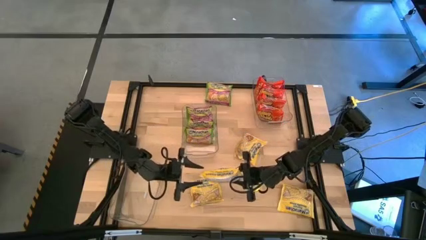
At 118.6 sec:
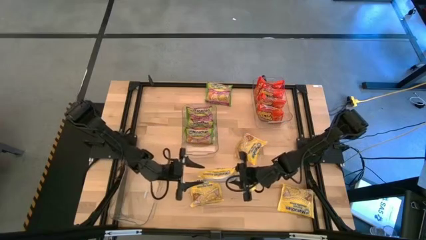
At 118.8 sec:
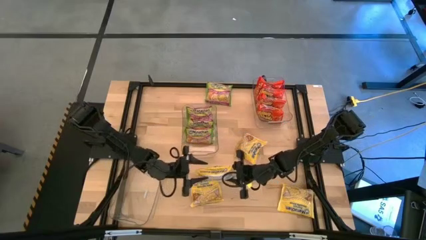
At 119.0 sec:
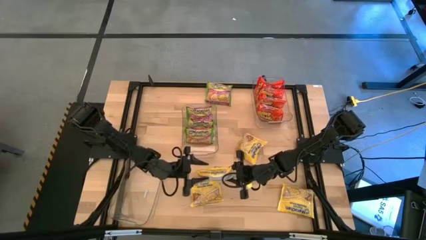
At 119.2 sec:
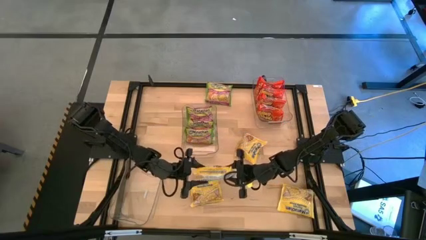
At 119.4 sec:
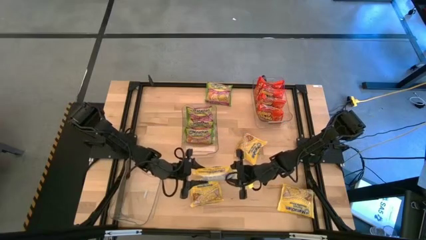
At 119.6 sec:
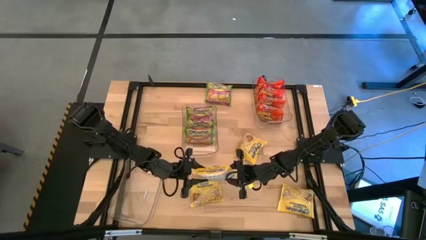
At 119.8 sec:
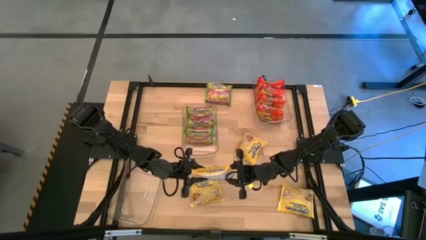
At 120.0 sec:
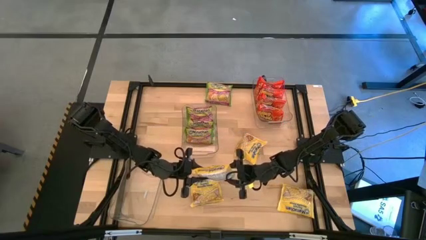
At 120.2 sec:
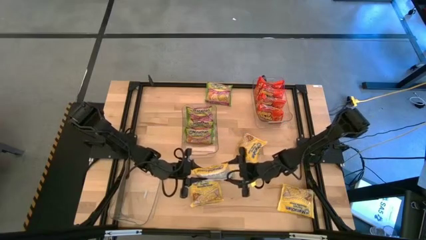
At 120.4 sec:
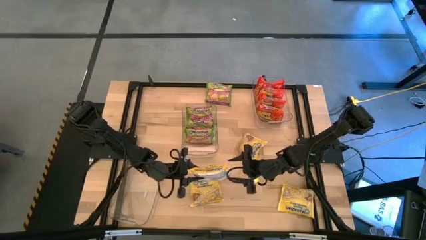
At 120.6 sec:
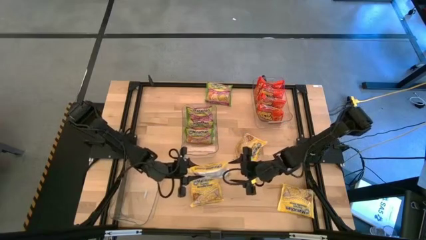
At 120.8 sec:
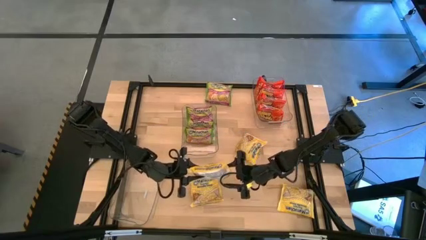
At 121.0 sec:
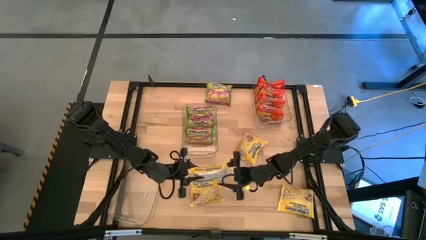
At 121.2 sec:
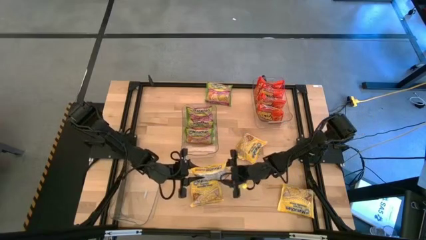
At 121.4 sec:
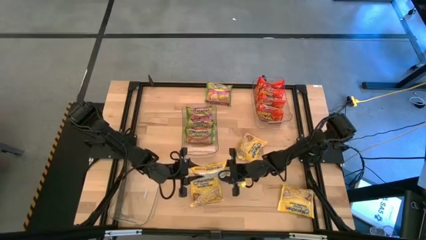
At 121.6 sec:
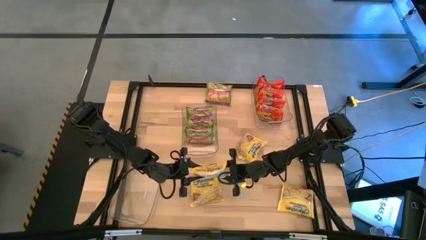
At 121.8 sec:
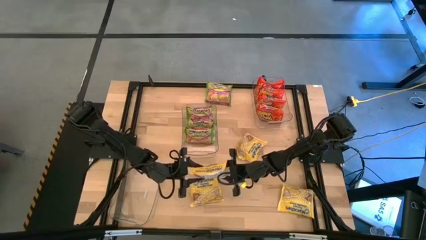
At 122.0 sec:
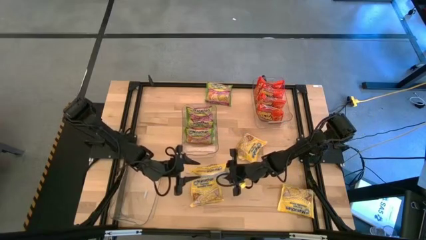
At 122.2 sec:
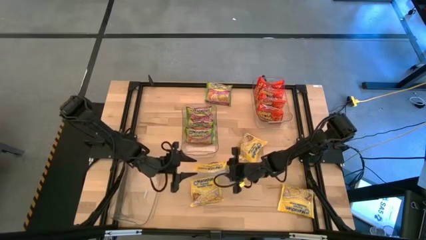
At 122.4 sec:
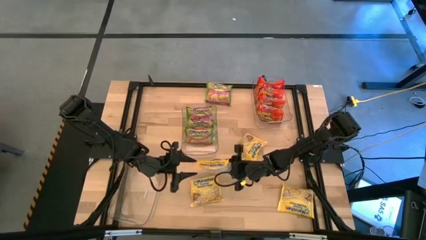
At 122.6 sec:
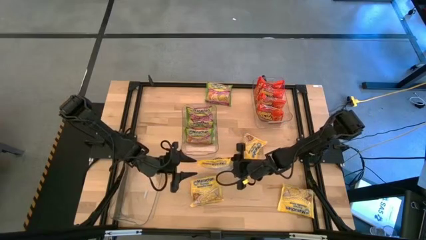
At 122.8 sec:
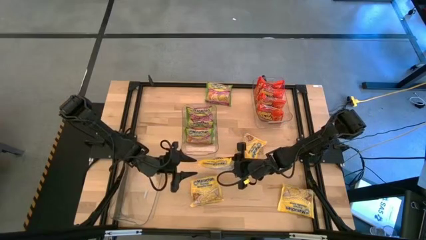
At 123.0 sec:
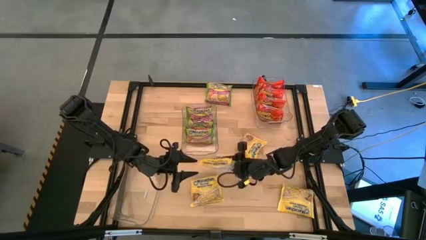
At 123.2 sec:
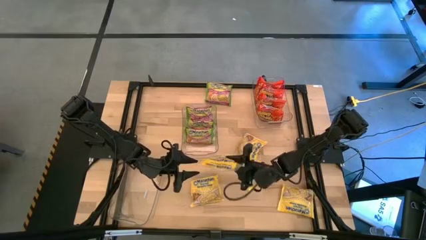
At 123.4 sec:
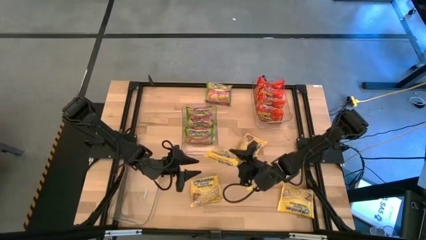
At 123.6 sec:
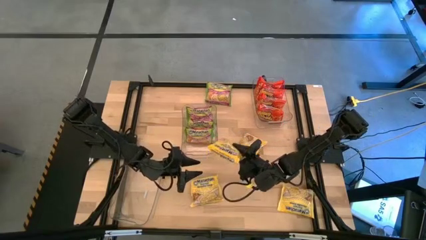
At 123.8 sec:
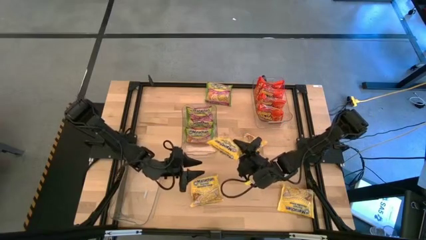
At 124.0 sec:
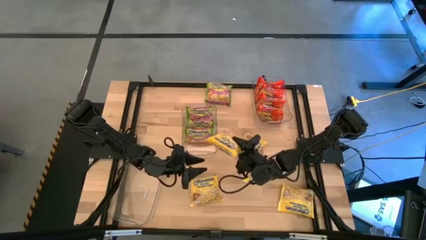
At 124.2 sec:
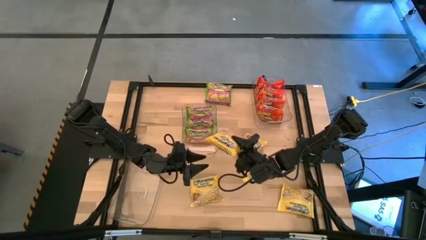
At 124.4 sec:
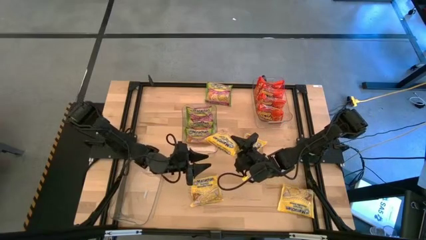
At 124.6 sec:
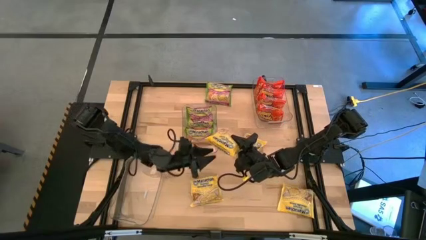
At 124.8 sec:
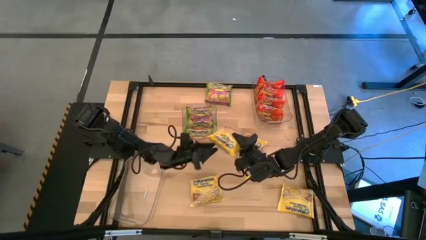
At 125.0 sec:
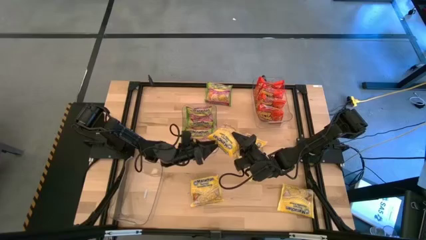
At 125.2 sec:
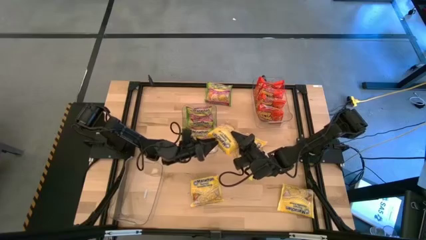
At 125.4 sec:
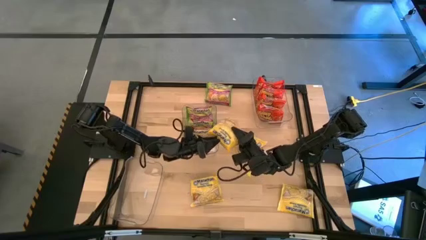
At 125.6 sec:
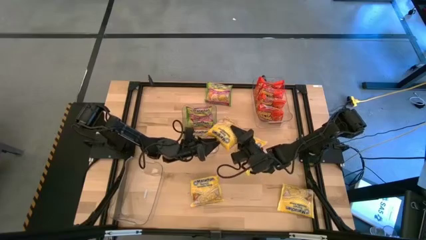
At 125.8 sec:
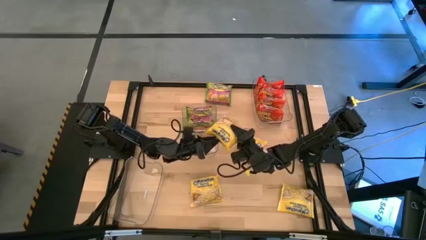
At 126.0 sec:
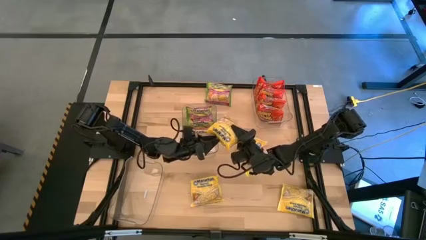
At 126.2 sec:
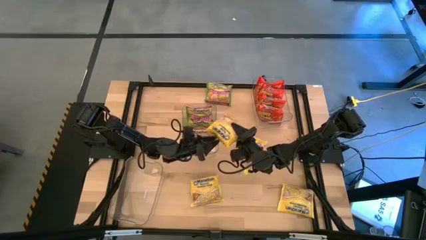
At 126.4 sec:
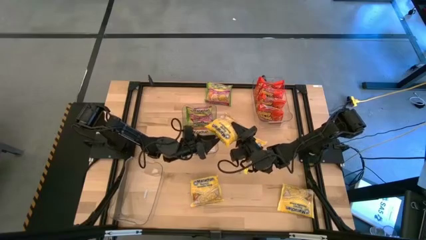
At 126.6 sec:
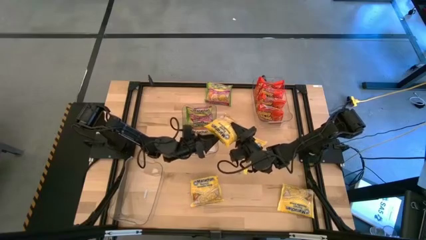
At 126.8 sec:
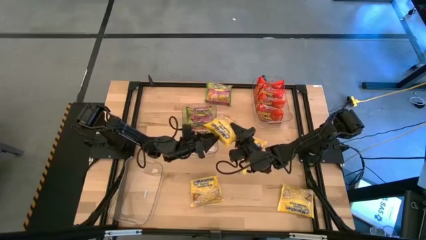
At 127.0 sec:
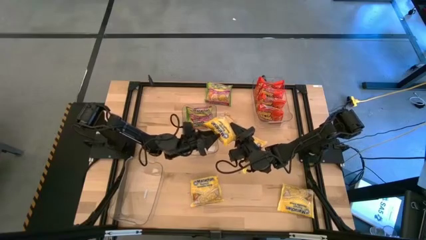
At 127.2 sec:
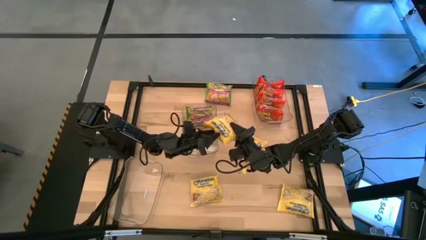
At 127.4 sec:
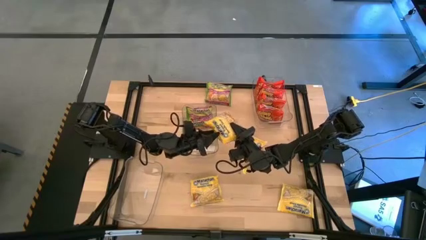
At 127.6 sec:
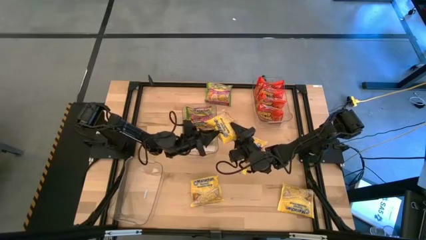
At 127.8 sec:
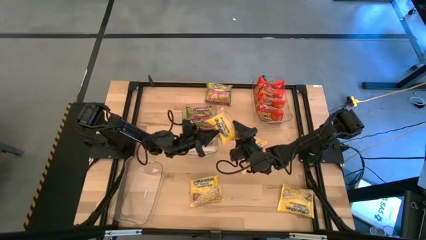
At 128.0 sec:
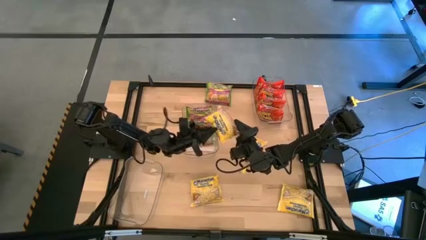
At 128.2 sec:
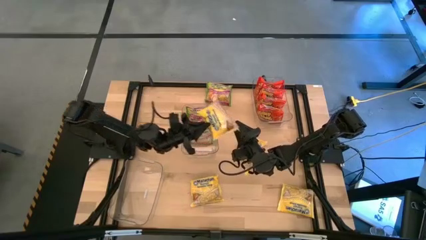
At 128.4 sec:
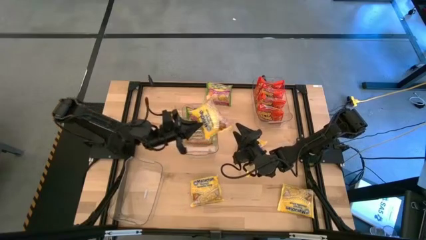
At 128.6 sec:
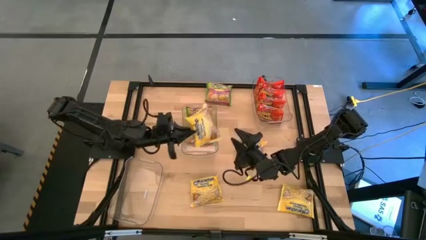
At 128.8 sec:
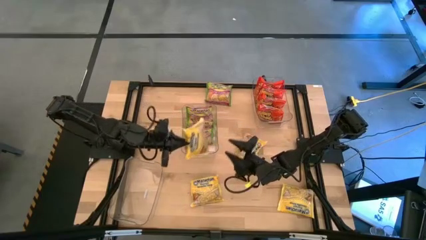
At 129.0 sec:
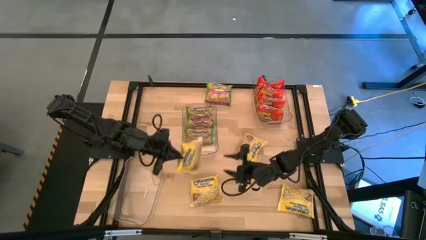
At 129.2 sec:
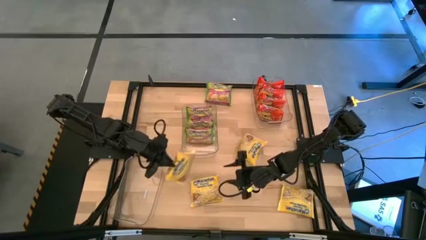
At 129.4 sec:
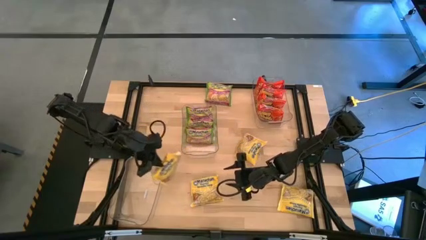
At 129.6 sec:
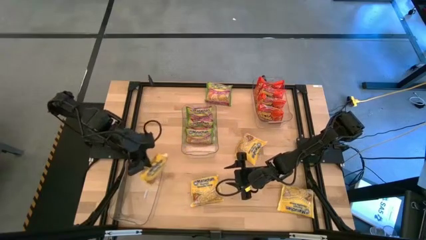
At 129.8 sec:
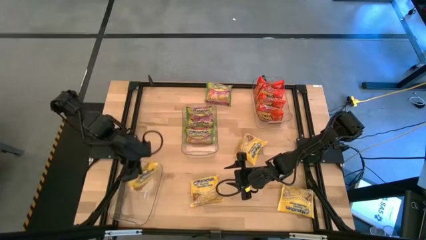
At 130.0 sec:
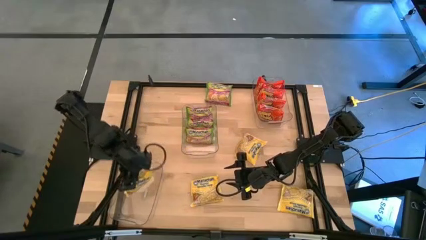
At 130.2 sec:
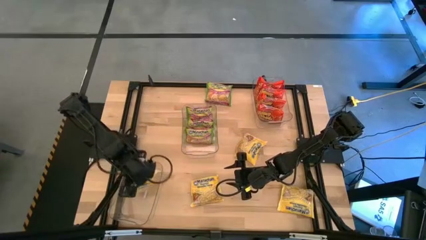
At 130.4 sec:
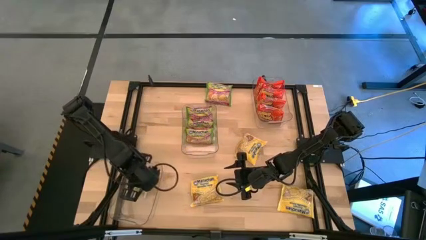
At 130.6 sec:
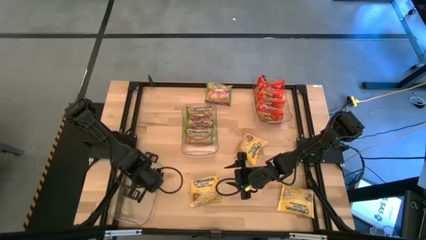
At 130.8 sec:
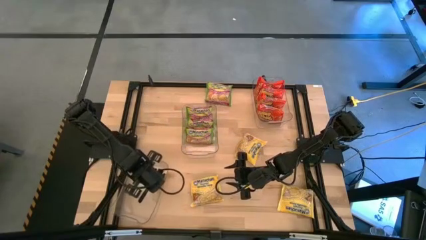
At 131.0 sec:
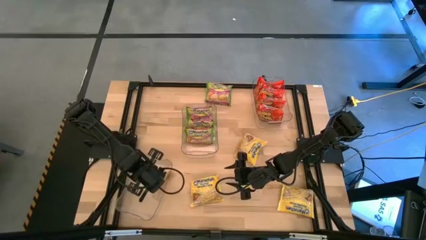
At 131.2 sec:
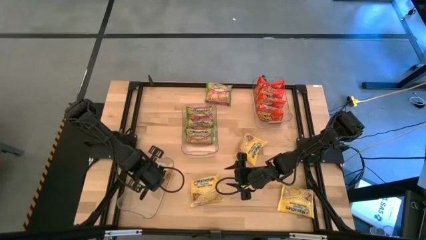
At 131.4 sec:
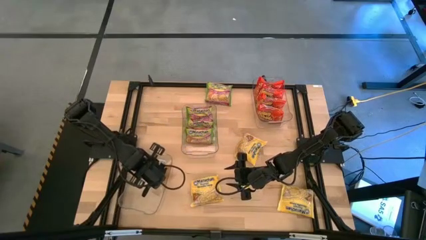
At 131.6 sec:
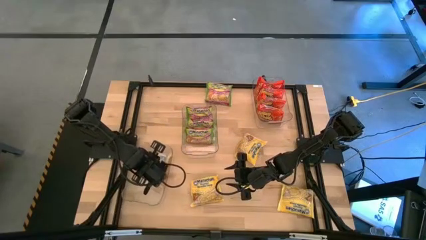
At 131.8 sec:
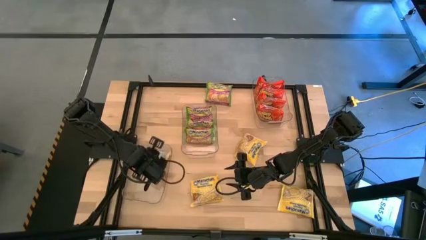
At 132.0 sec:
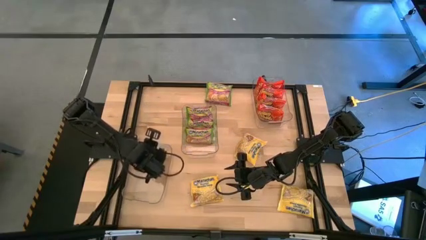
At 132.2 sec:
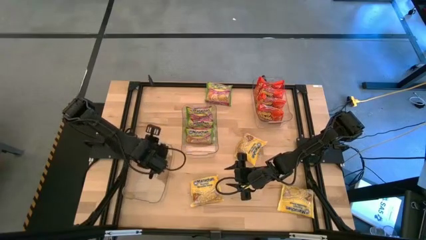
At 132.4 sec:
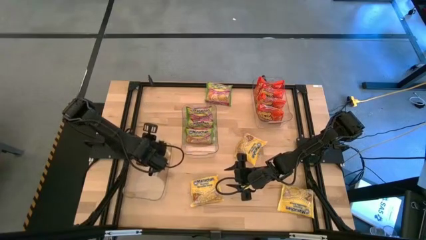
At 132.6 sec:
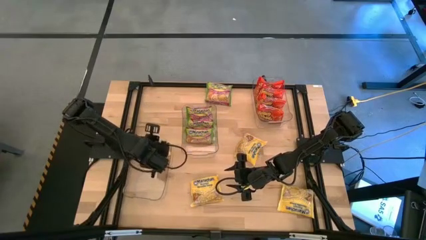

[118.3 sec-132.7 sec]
Task: Sort Maruchan noodles
Put the yellow noodle pack into the bottom left transparent bin
